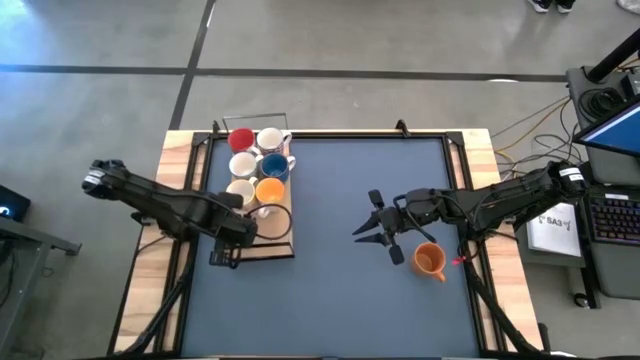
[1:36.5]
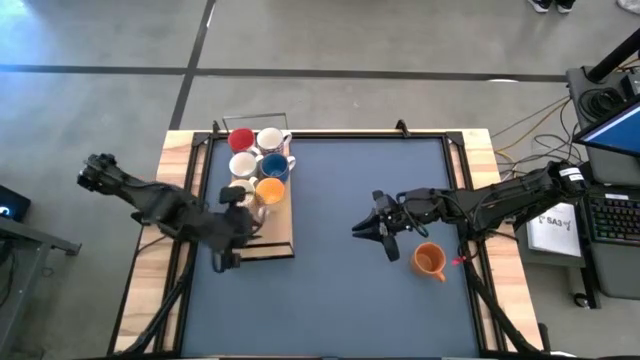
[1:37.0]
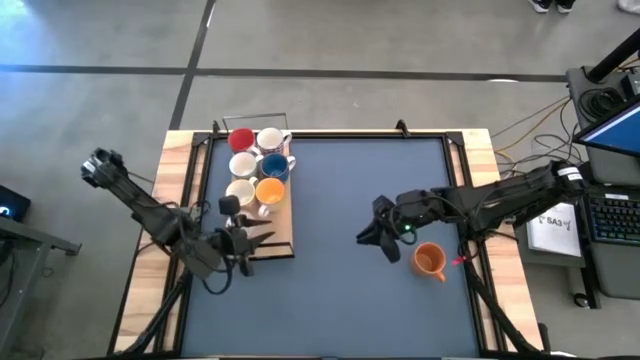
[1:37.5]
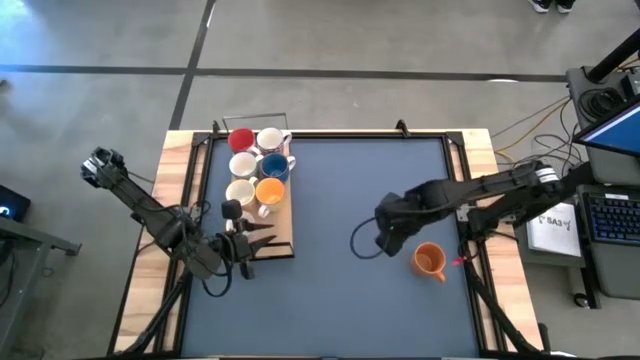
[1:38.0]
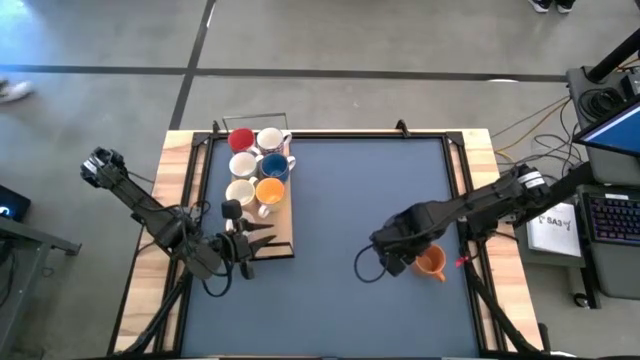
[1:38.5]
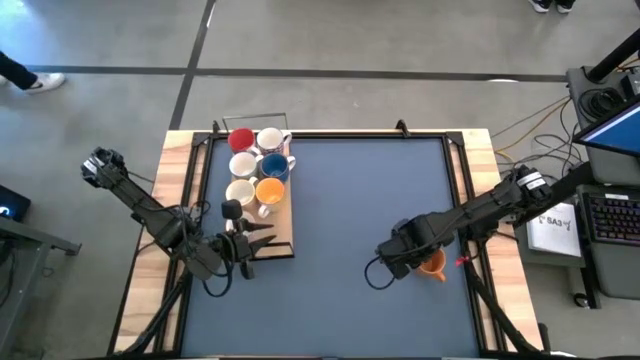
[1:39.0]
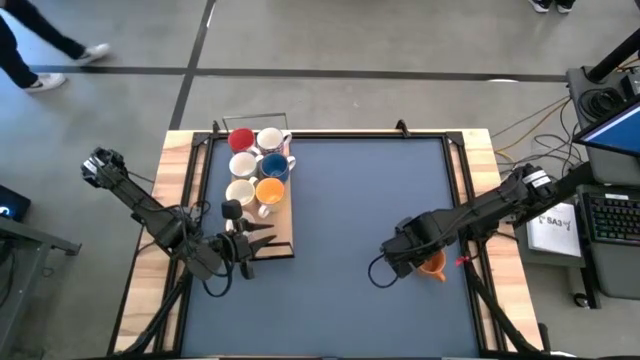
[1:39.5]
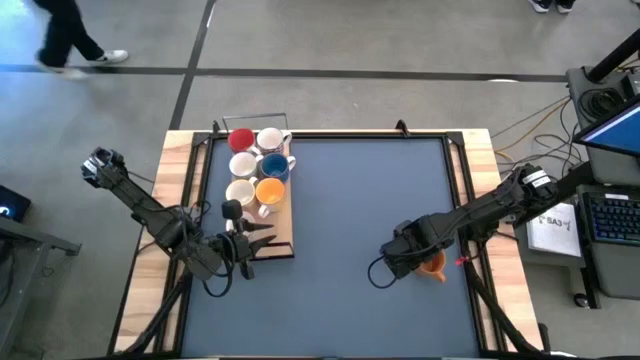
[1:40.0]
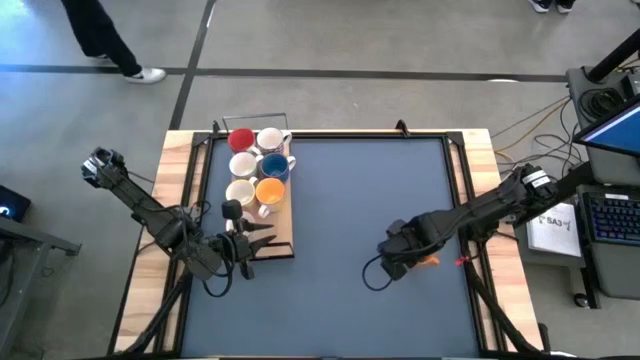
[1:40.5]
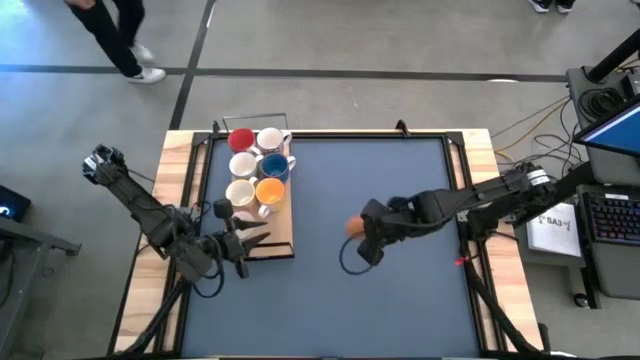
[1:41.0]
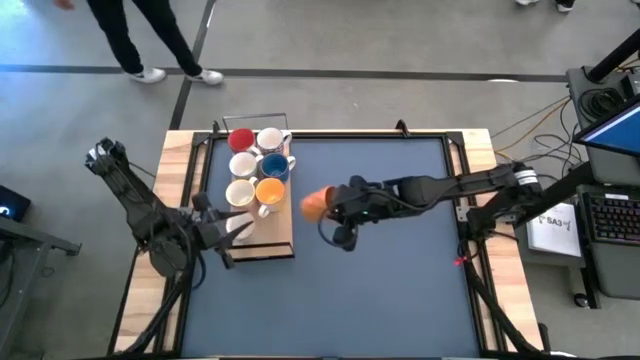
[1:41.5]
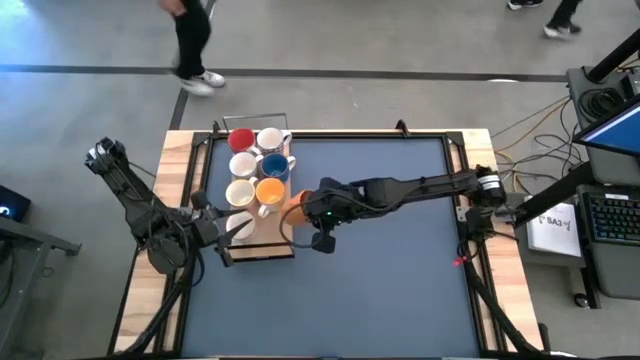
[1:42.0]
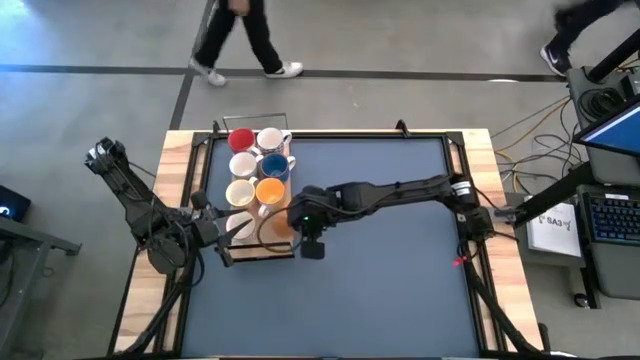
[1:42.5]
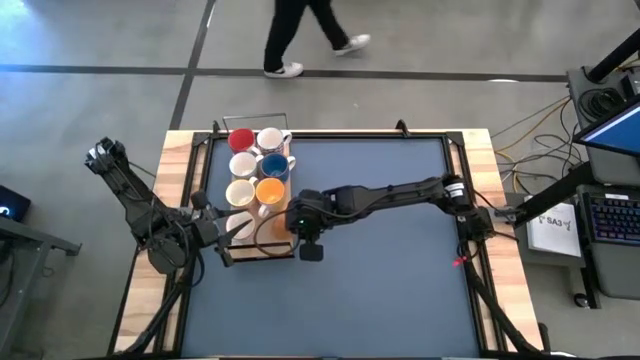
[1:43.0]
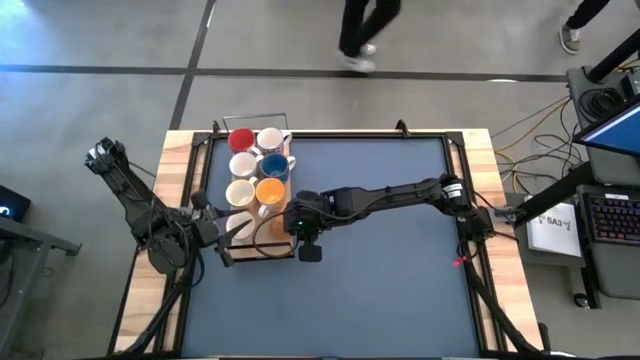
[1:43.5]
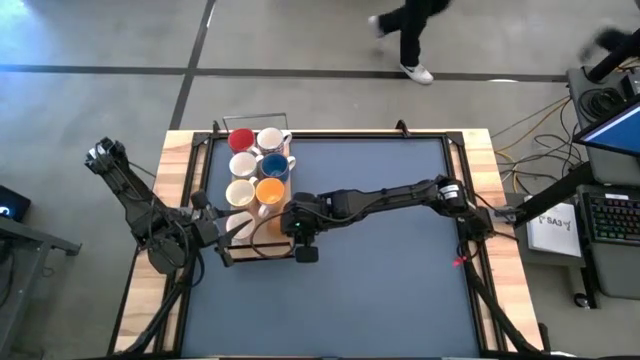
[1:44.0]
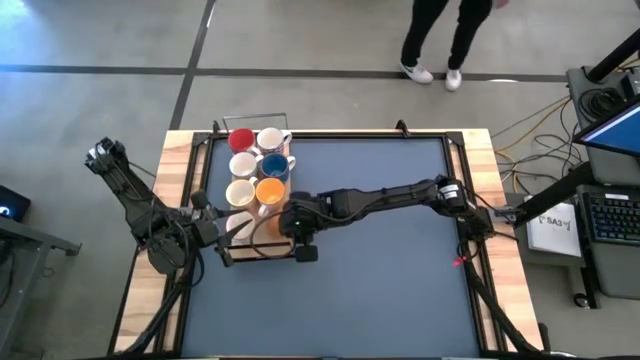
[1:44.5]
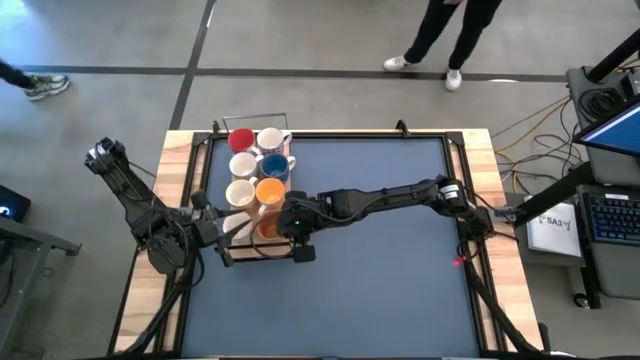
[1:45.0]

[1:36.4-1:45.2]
Task: Place coffee mugs
Put the orange mug on the shelf

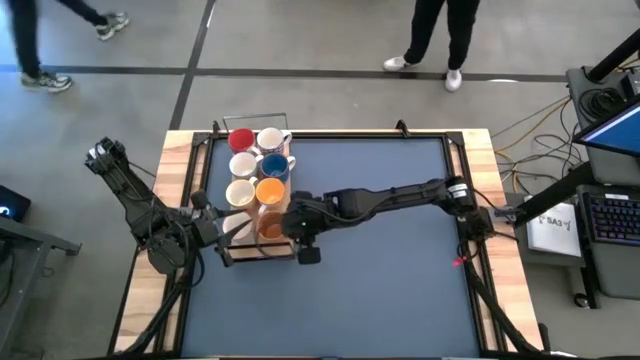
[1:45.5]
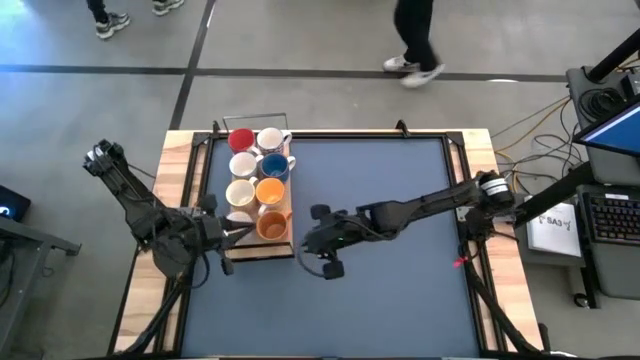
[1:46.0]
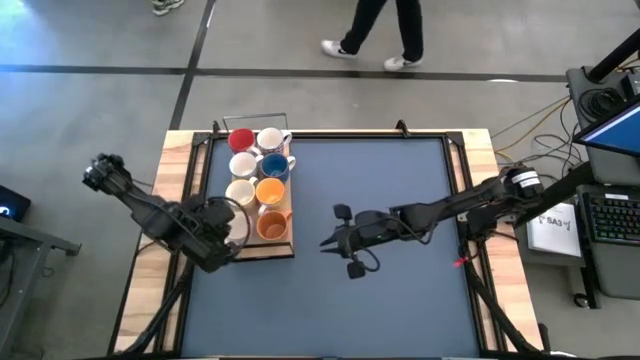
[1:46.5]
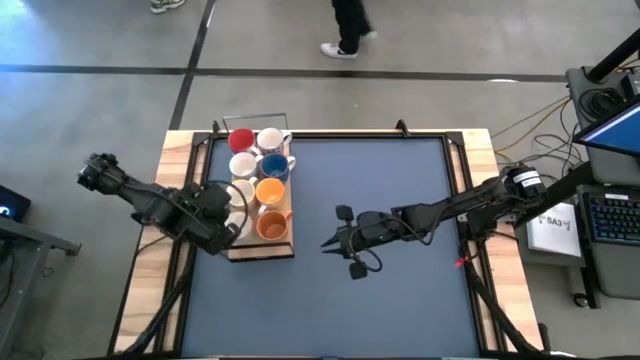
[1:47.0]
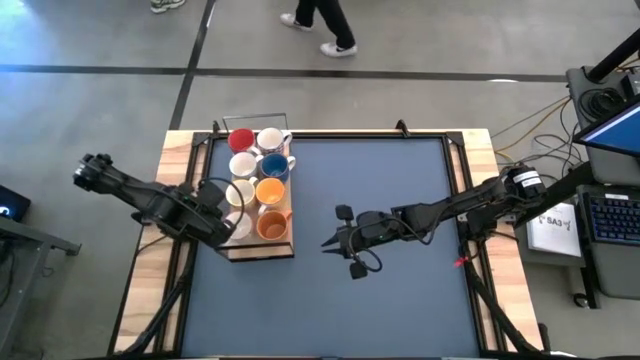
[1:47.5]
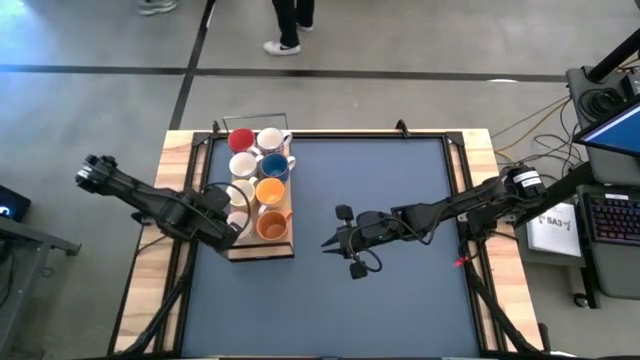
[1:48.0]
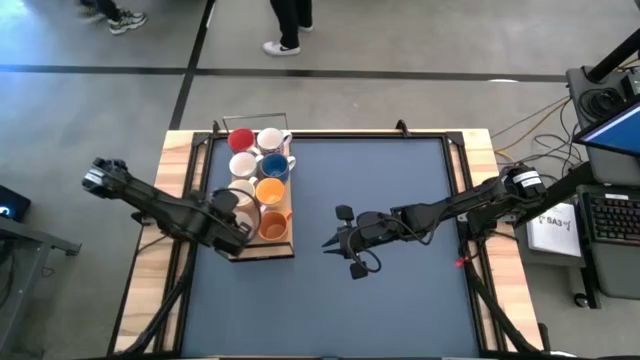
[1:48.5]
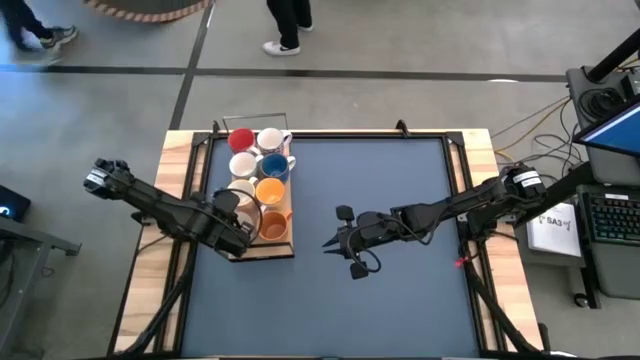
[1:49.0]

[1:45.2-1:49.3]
Adjust the gray patterned mug on the shelf

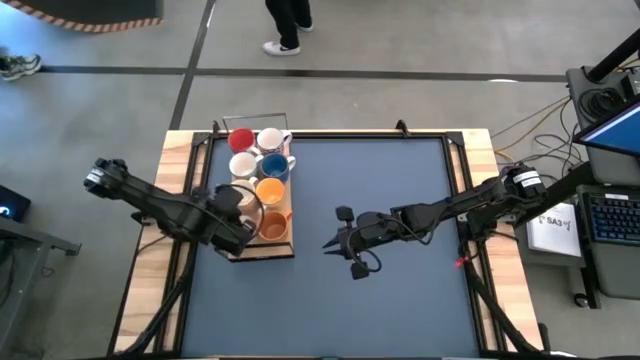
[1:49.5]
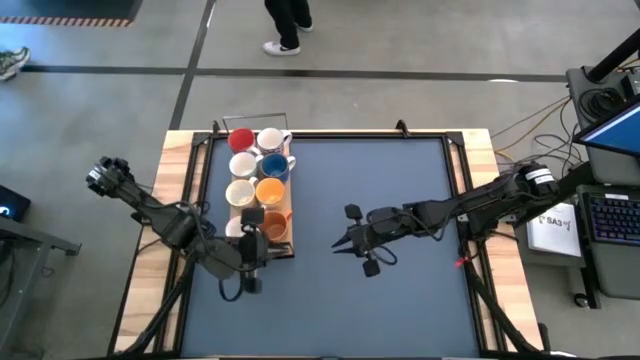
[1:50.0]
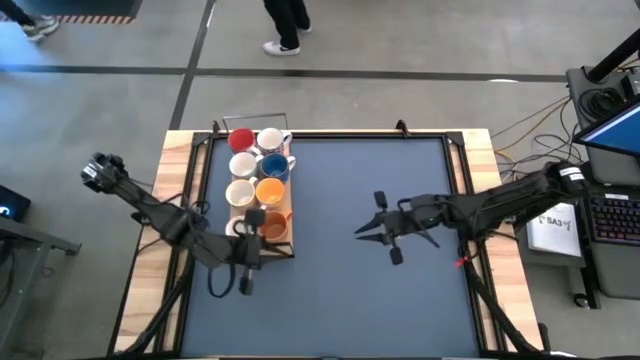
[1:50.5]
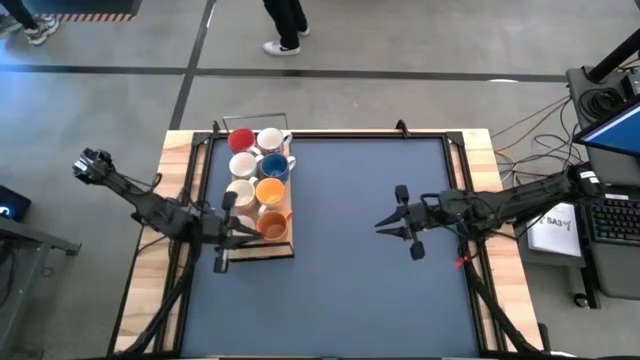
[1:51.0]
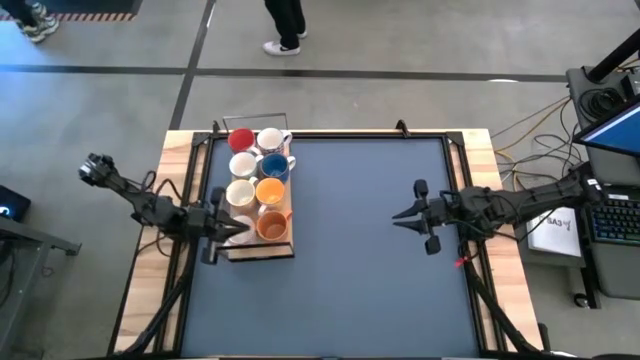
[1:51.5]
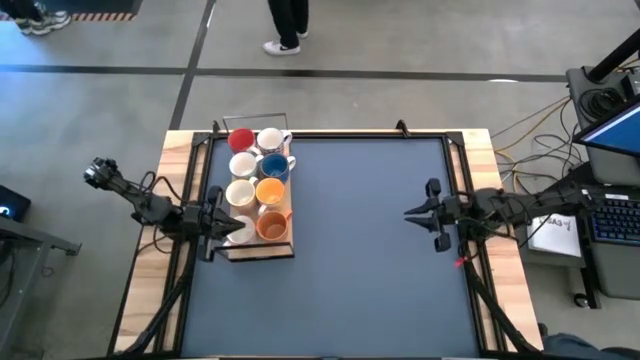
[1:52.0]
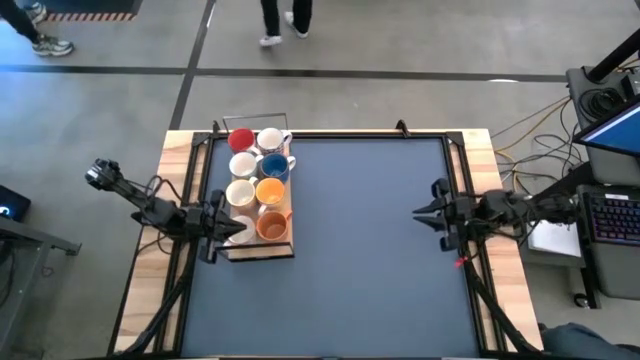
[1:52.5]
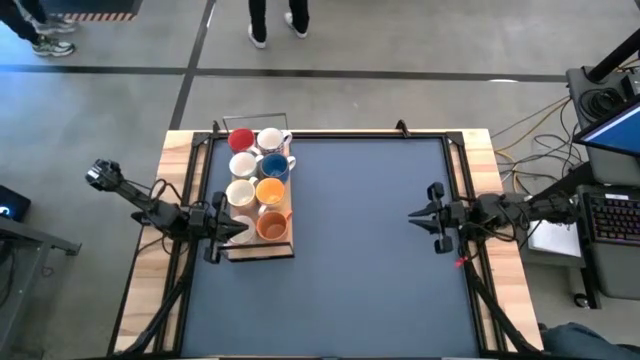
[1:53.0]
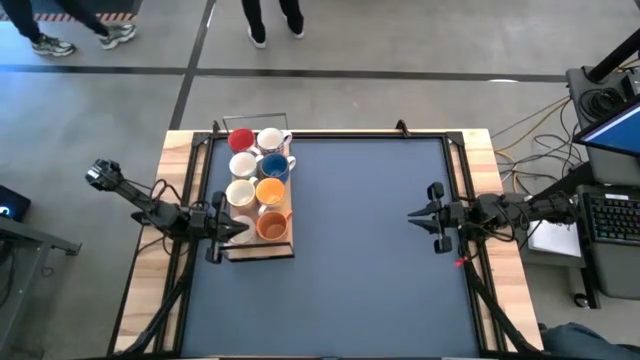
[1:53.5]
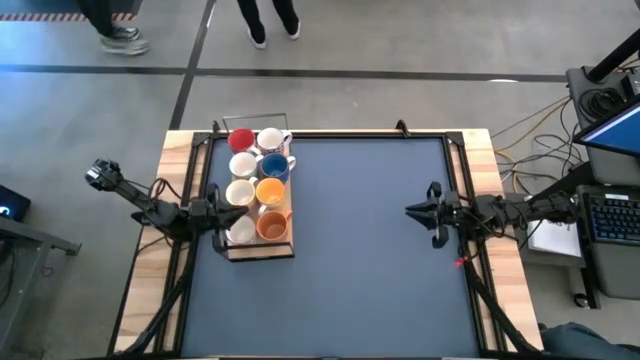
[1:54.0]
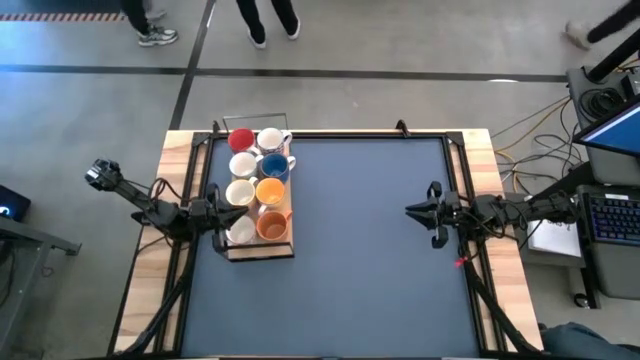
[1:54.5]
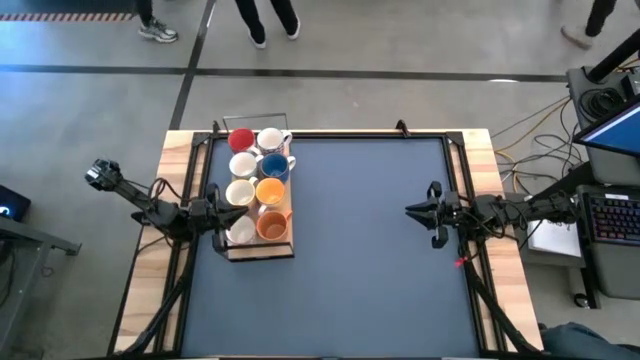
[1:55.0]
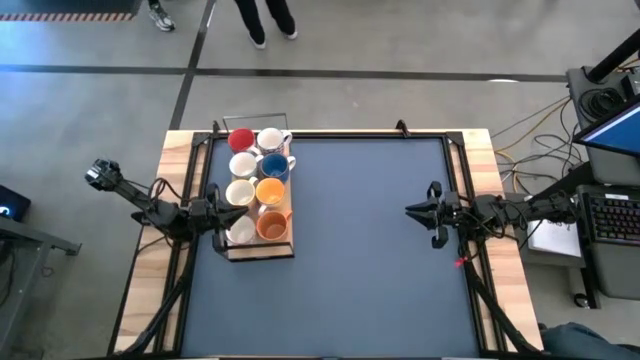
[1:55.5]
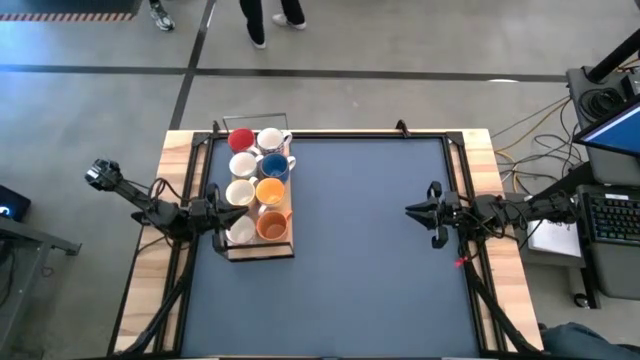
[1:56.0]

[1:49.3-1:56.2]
Return to Home Position
